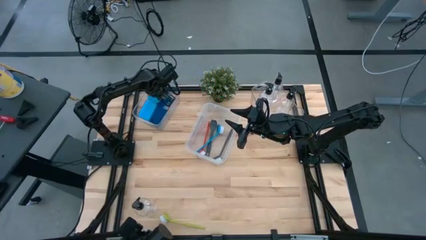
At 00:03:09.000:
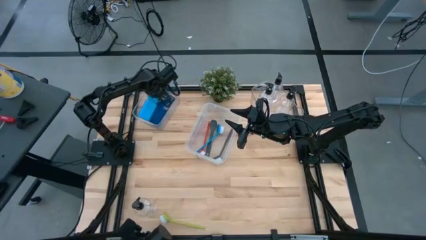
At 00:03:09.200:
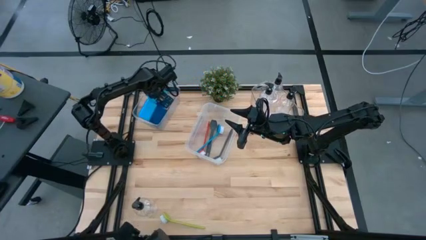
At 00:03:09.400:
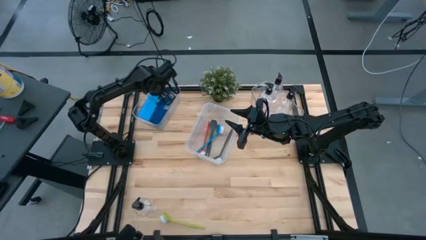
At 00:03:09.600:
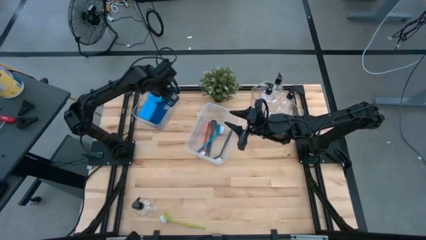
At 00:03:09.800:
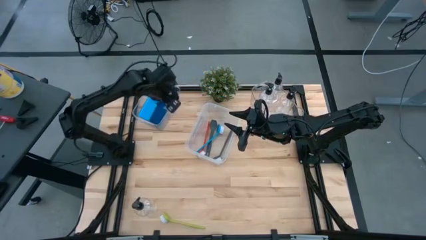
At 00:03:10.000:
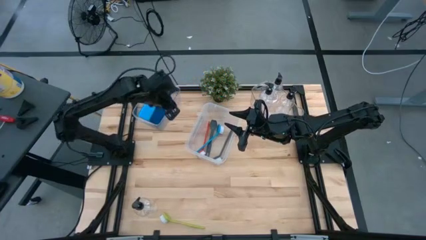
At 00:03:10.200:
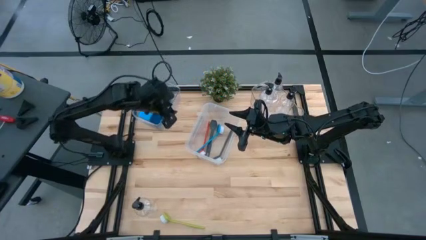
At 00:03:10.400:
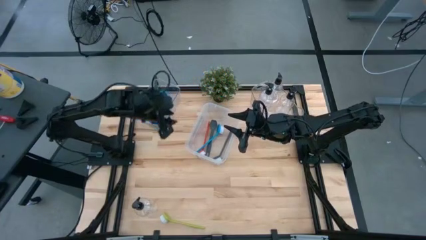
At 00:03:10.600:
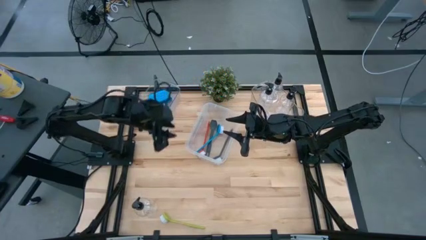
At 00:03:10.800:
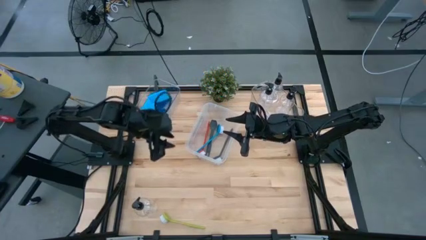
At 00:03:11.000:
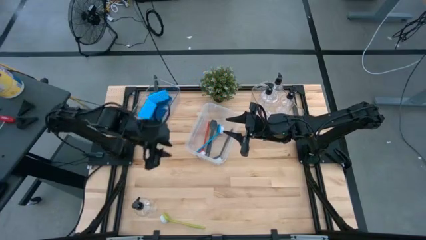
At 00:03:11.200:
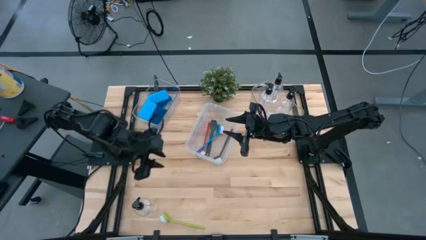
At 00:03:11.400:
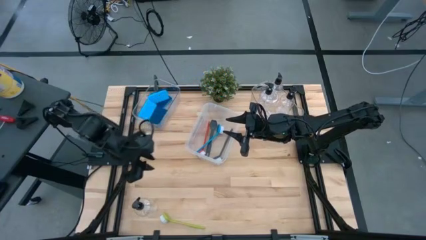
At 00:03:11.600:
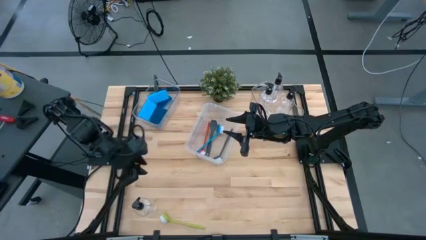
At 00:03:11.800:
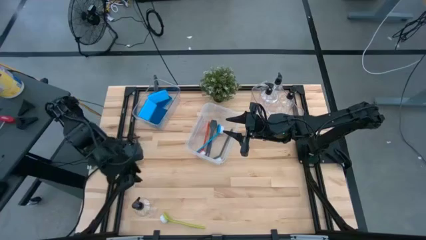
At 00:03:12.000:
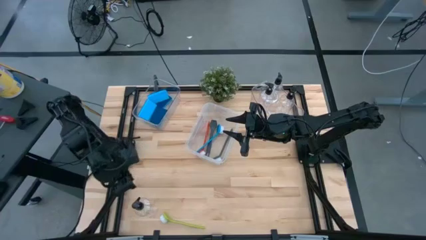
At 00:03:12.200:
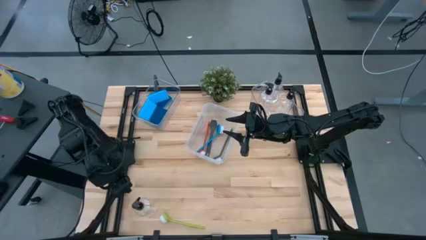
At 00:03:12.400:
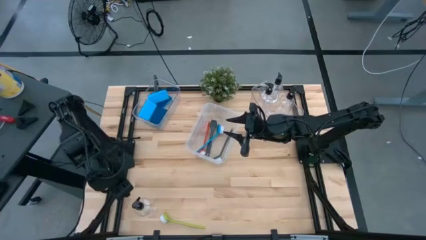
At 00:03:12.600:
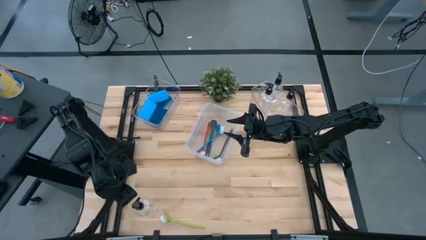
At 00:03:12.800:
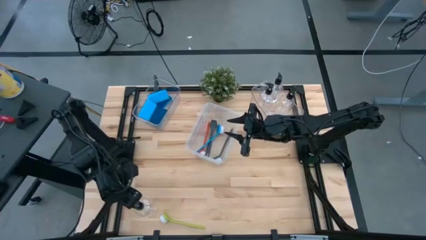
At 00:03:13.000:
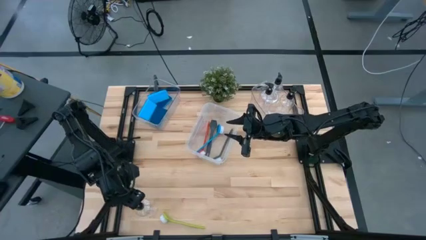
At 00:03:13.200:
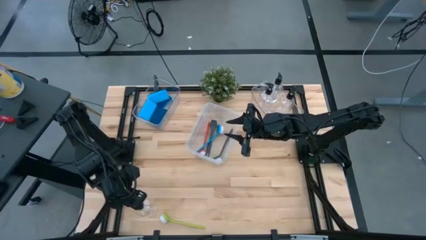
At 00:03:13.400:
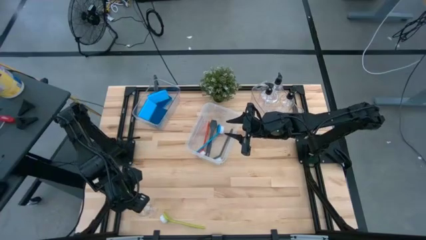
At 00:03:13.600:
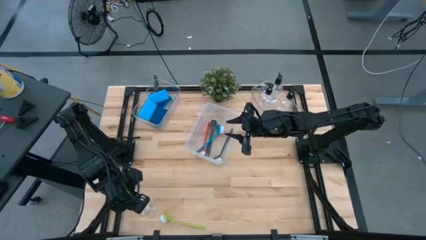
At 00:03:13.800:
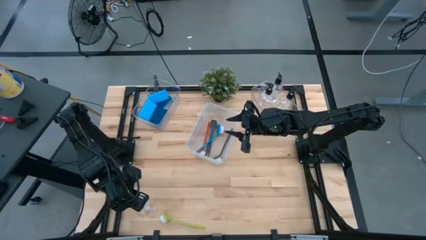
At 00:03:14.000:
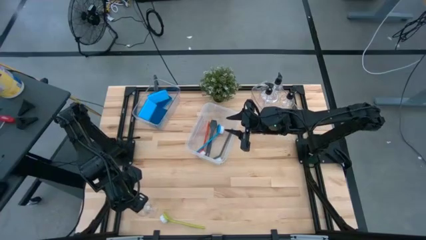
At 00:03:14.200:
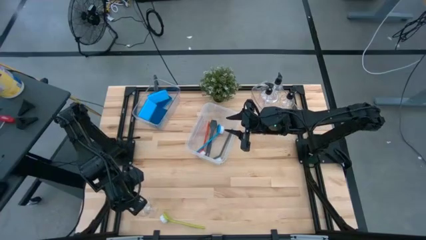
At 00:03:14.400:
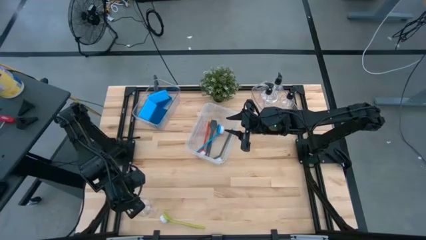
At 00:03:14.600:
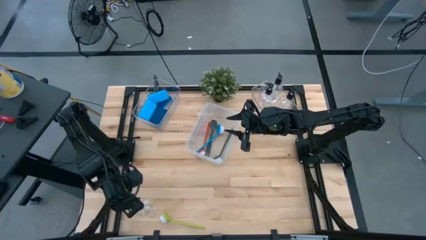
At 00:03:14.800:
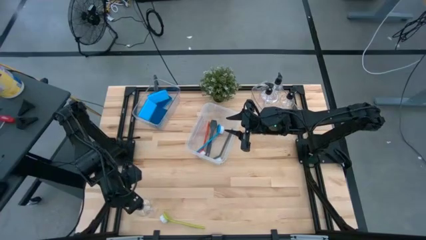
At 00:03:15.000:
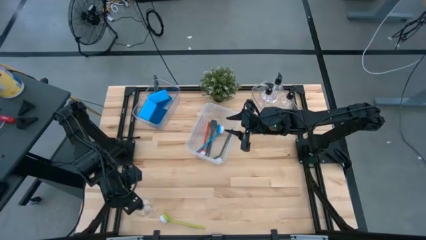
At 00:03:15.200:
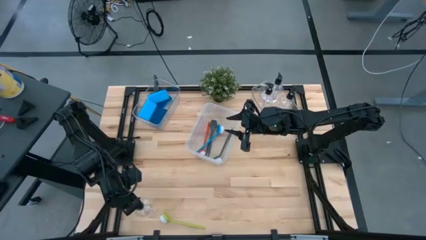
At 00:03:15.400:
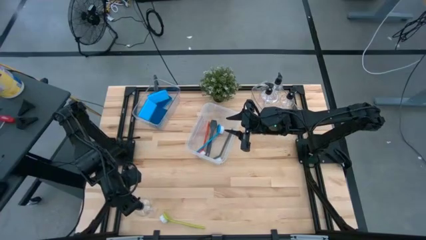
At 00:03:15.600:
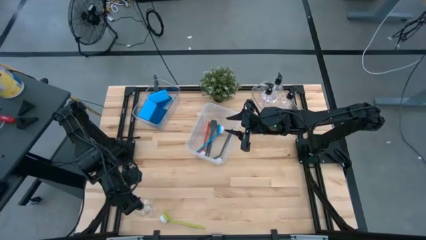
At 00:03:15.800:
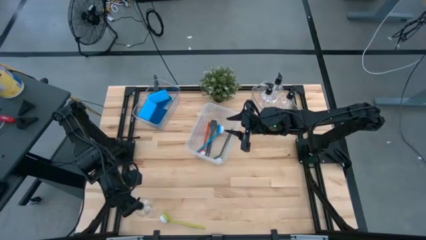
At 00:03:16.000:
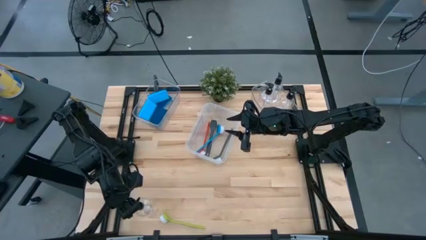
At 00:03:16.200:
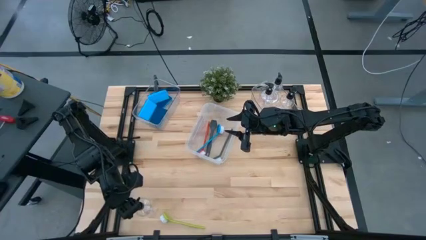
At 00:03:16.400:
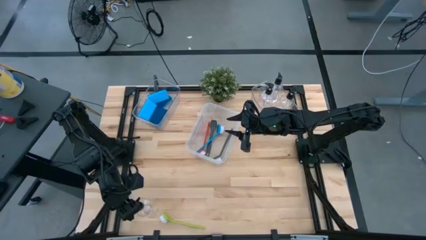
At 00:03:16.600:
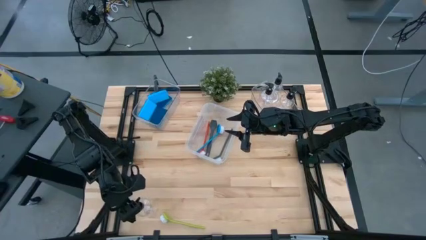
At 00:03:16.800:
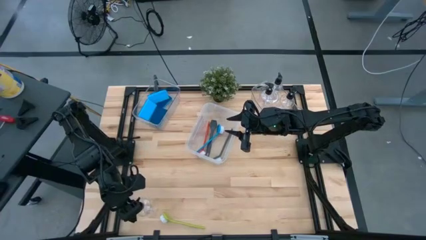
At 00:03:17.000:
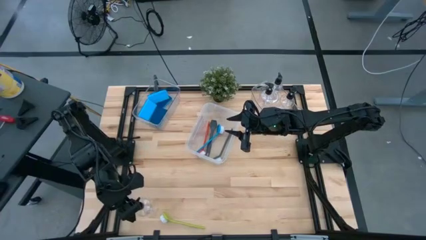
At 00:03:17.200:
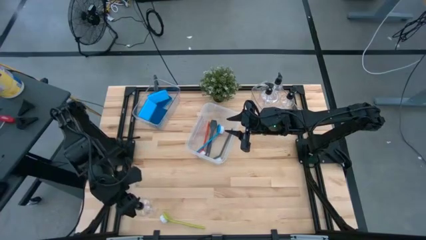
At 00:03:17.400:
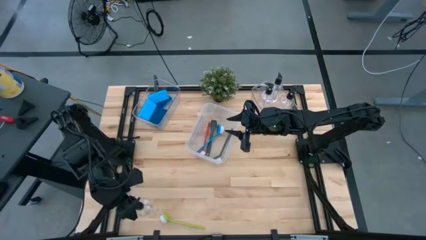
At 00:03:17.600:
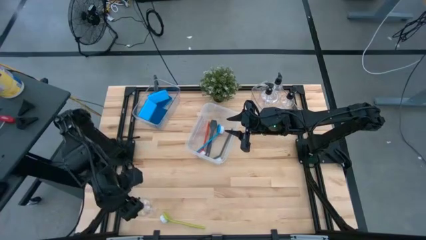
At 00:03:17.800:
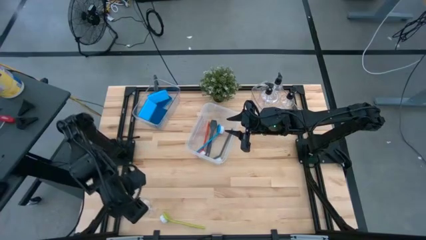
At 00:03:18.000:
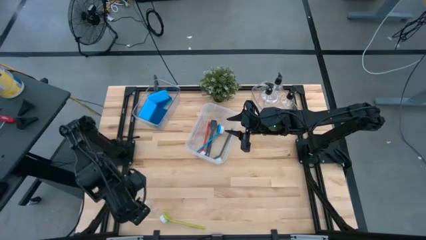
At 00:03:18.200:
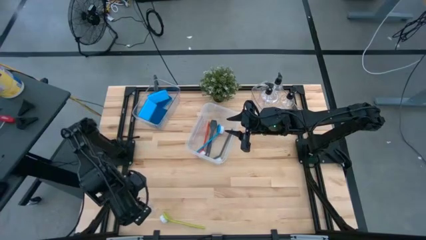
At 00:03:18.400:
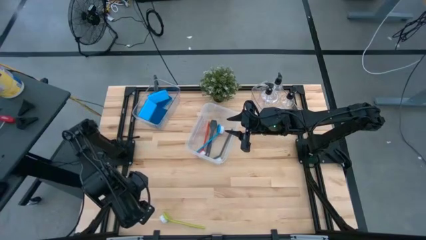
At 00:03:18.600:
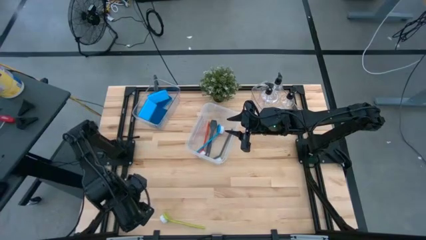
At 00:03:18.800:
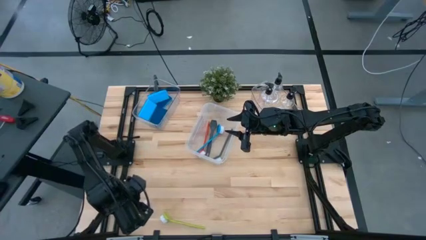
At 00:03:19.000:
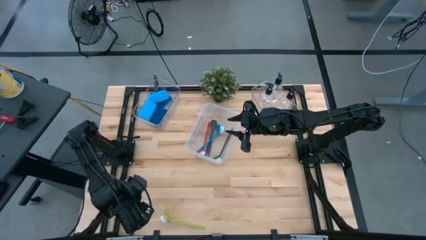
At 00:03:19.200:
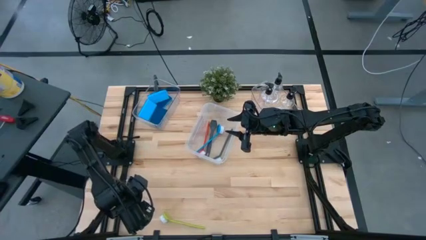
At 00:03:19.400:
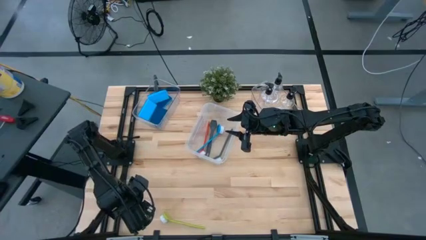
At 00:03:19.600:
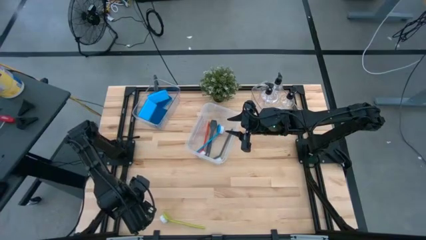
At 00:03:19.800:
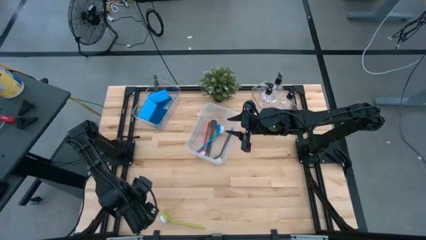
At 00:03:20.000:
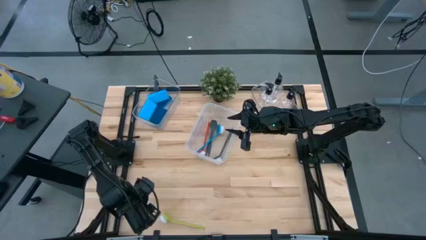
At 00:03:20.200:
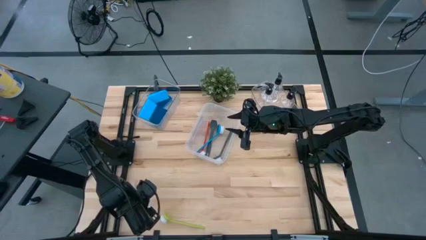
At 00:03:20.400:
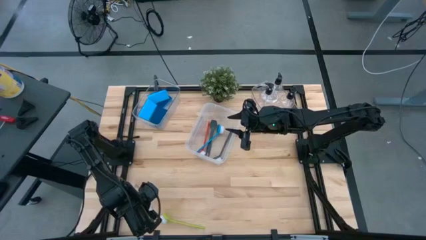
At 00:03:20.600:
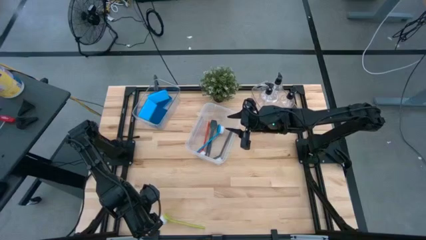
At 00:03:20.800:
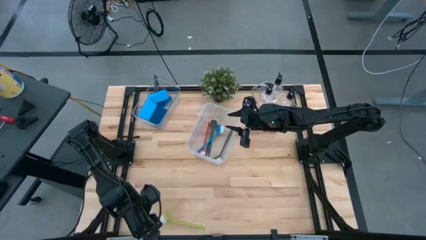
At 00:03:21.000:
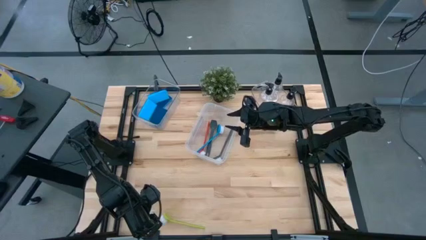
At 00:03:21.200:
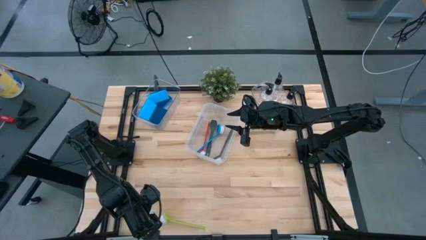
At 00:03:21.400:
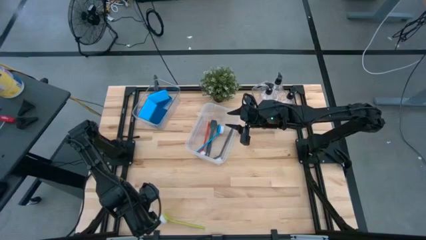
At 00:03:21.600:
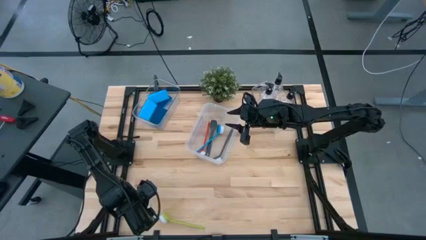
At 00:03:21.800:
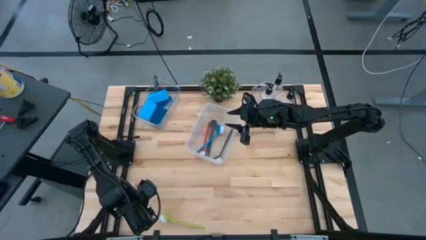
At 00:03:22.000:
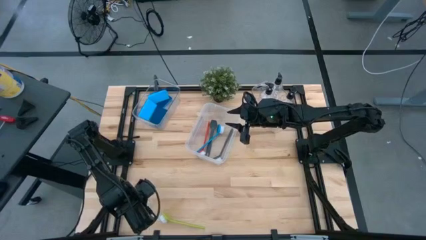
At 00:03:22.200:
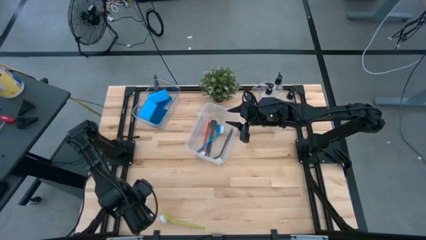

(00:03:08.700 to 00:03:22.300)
Task: Pick & Place Kitchen Sink Supplies
Put the black soap dispenser into the right transparent bin
